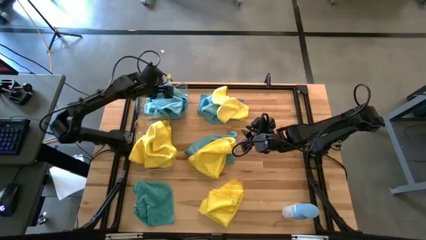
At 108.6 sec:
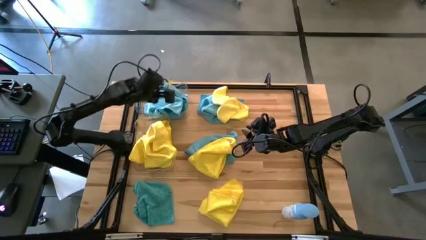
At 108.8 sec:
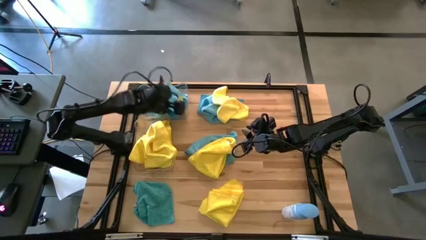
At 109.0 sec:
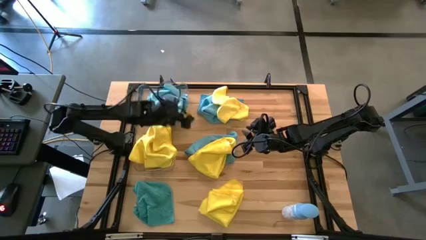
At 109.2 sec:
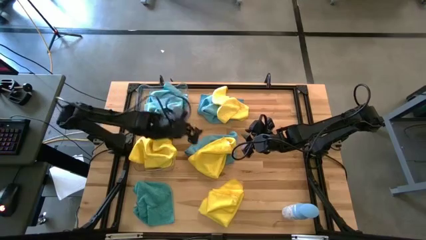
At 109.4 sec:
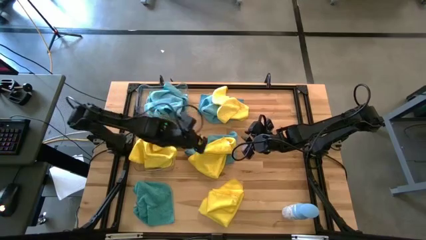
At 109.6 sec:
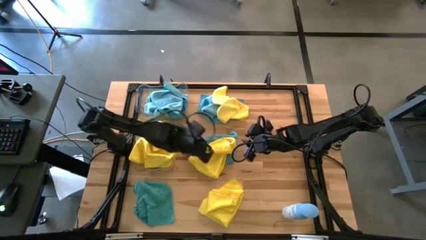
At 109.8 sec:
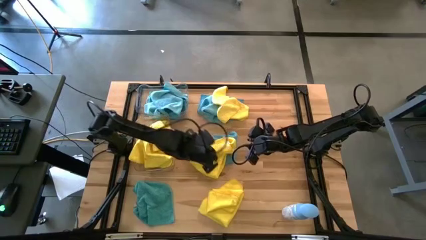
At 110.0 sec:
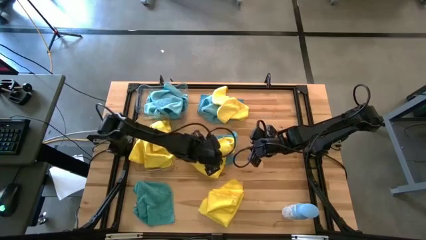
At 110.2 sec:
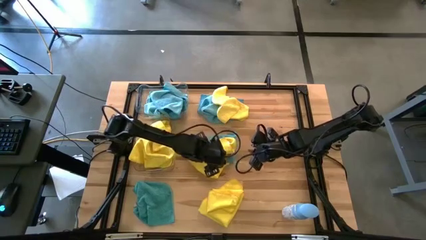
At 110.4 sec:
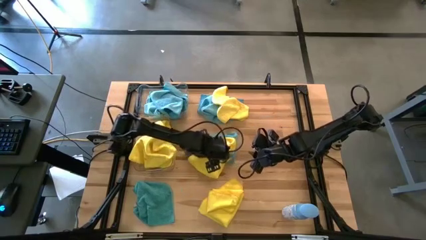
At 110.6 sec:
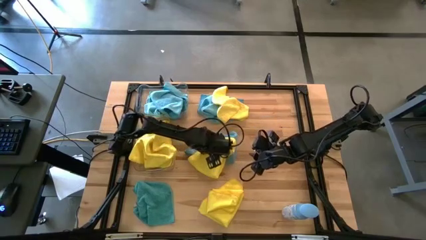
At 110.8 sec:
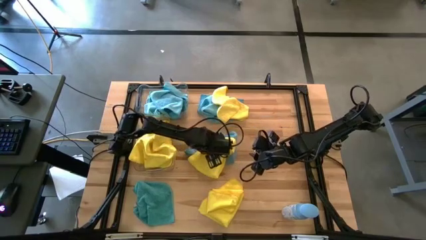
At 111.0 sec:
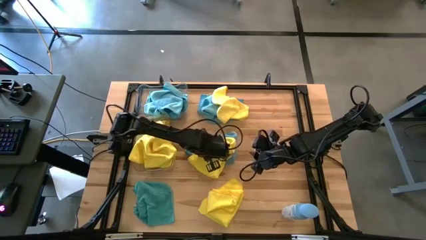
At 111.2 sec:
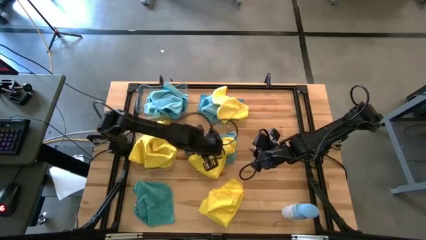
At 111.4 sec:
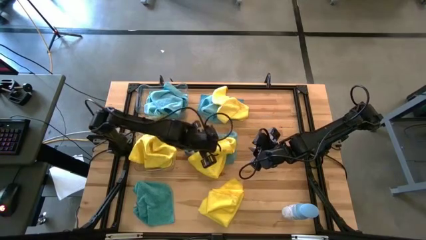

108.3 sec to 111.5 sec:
Task: Sort microfiber towel by color & place in baskets
Put the yellow microfiber cloth into the bottom transparent bin

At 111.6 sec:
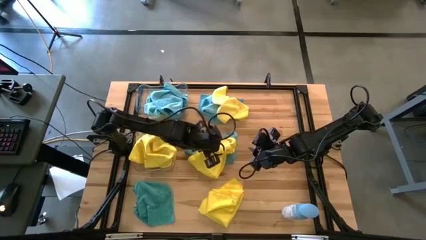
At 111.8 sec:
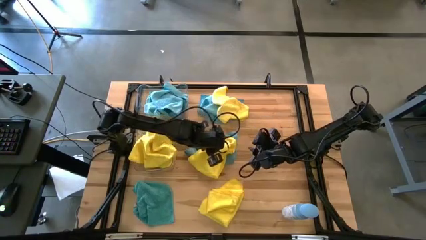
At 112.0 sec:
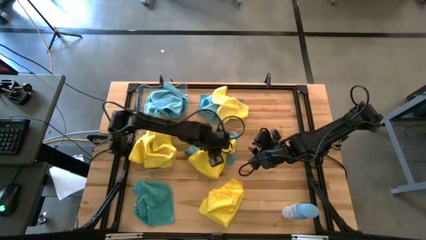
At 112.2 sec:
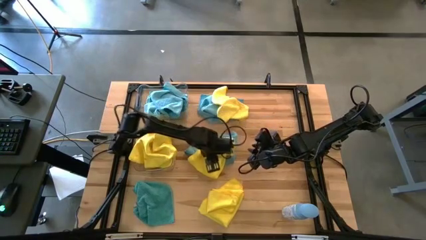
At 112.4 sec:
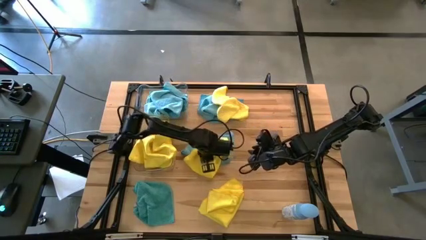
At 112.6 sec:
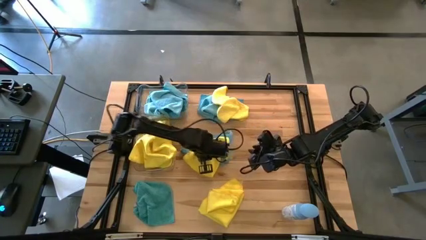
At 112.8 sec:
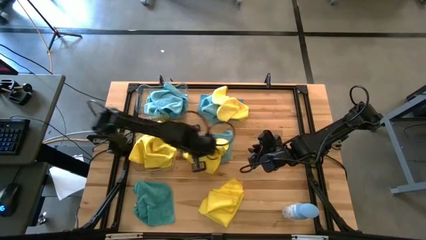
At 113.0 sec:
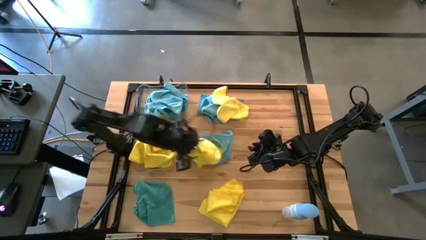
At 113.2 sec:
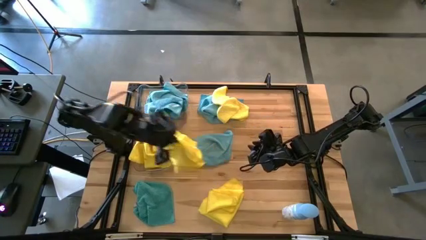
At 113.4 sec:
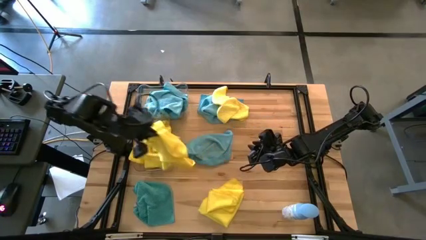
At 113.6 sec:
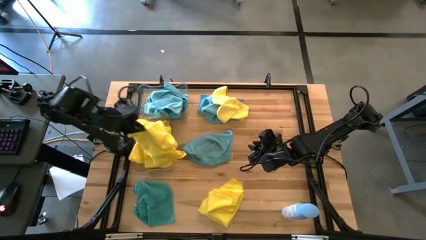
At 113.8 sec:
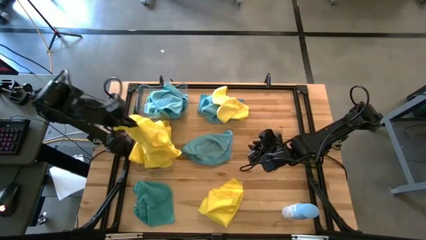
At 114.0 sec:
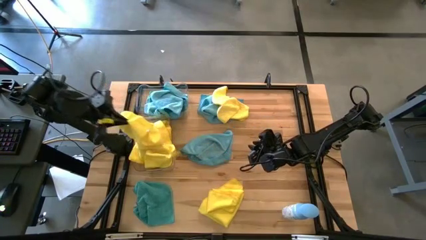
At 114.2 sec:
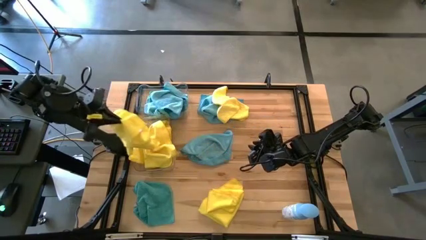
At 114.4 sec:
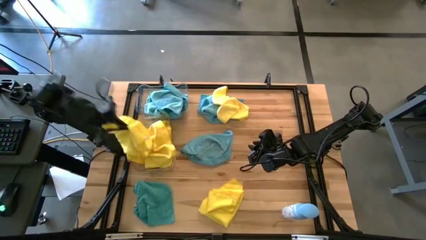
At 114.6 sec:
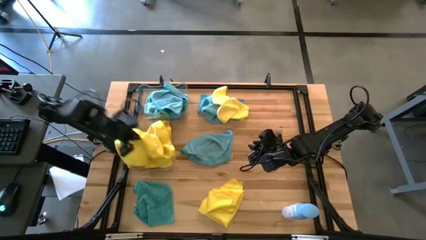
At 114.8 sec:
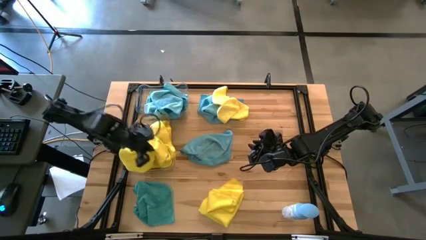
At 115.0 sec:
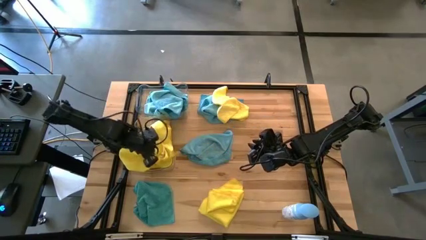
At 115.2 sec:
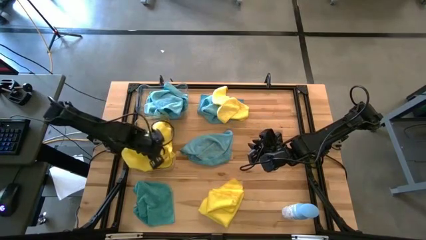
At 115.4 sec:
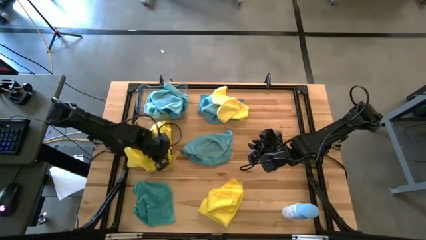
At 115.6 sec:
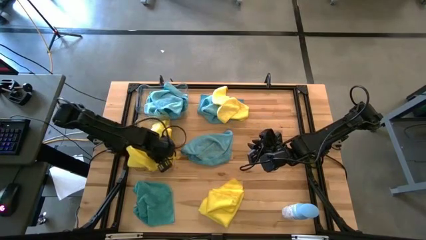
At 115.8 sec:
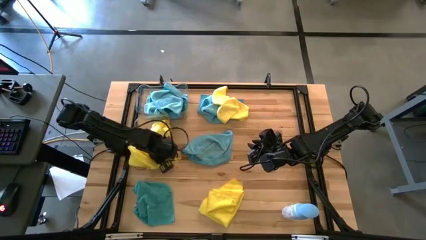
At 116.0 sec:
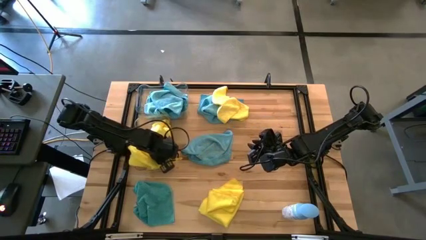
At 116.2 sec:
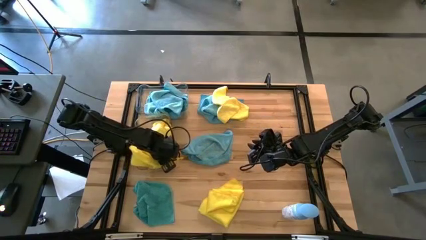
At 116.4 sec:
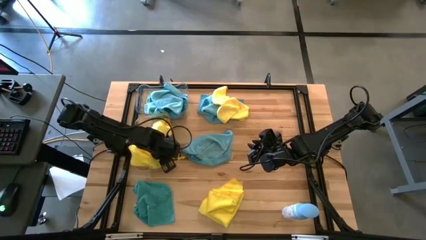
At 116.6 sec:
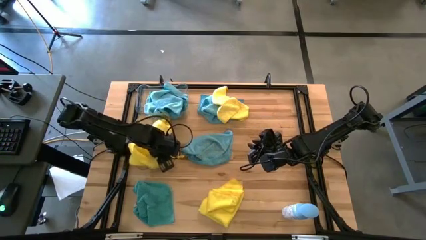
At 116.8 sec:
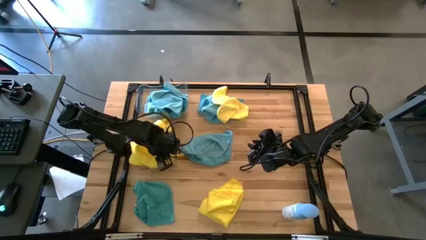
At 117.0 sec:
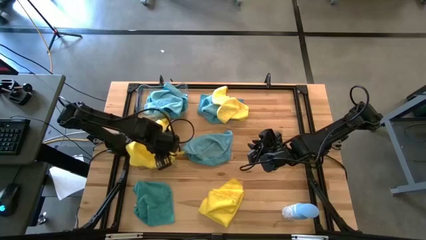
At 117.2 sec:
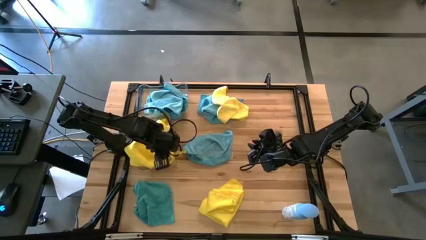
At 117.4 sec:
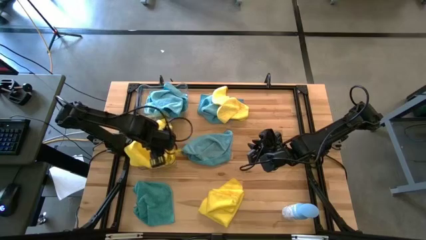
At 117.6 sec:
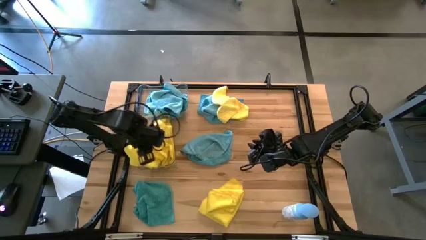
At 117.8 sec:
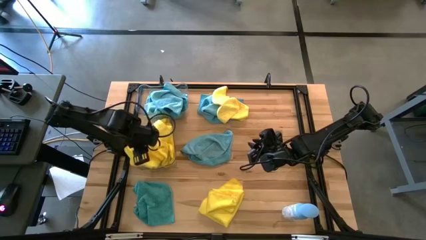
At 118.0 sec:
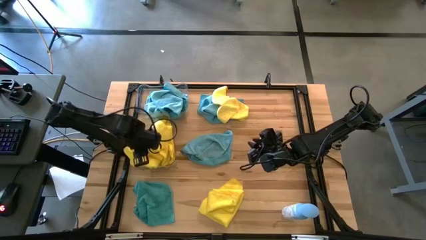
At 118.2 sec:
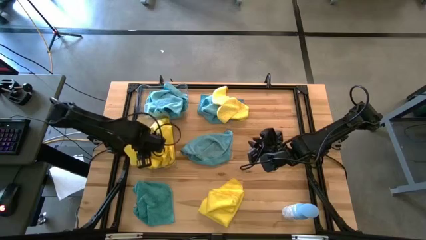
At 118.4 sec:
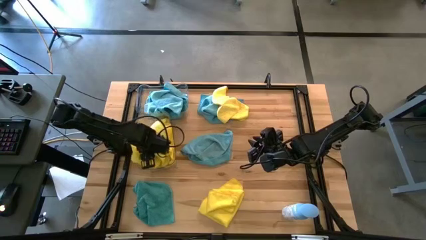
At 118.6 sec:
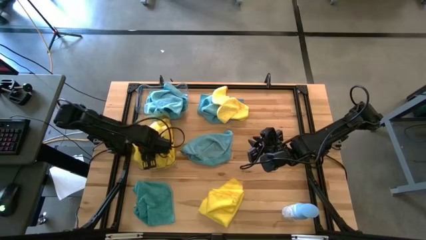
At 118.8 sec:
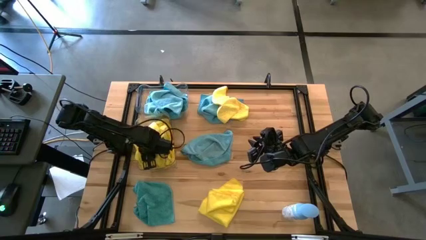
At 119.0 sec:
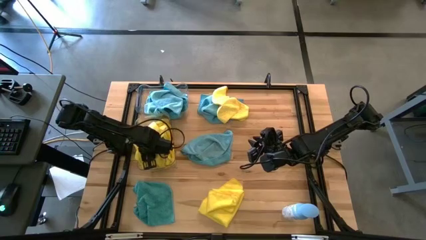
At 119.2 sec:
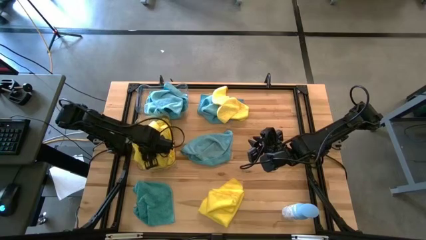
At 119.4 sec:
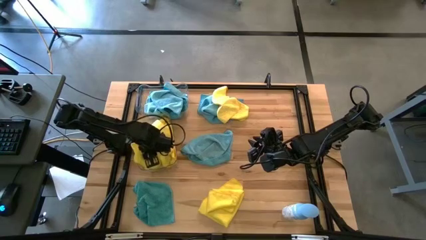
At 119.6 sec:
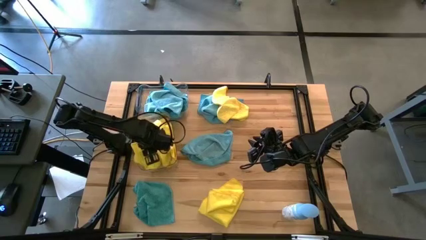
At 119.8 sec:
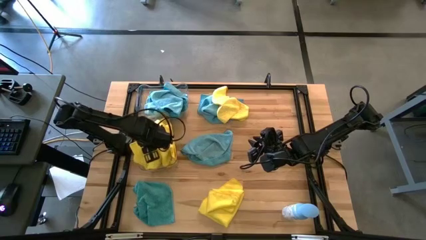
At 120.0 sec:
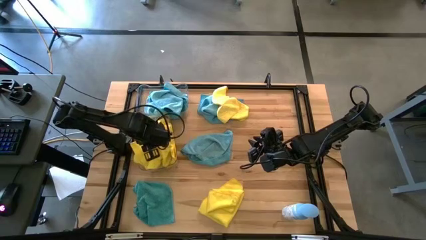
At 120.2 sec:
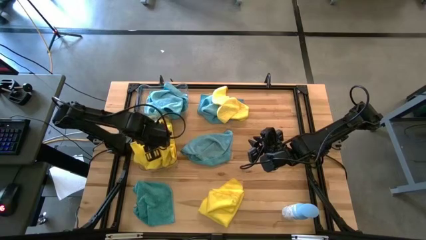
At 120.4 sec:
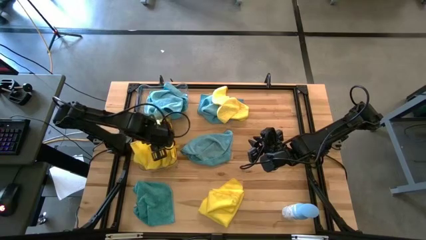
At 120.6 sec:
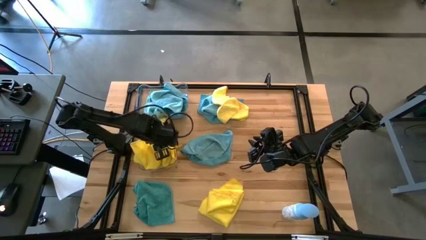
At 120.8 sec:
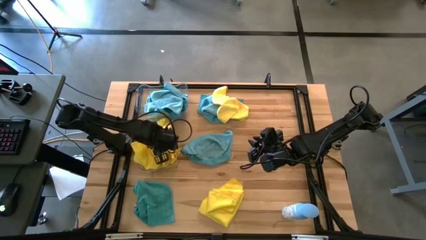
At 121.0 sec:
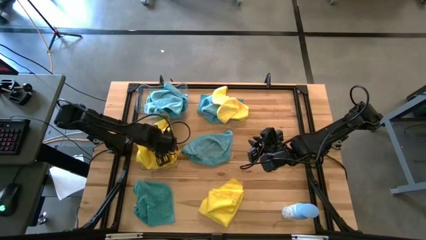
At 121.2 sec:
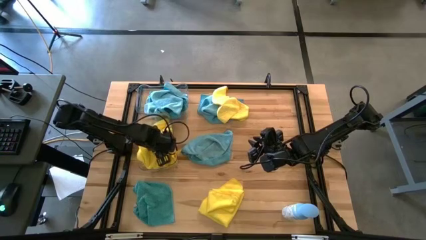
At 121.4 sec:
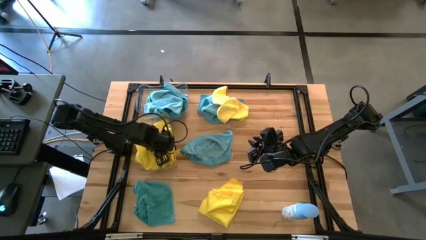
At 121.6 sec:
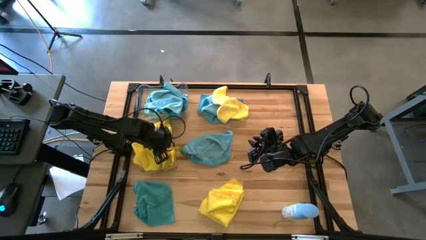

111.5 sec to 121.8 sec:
Put the yellow microfiber cloth into the bottom transparent bin
